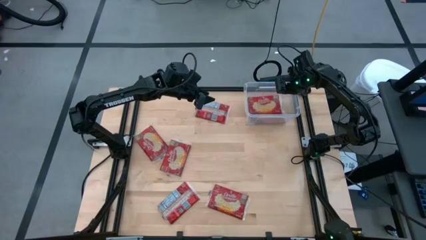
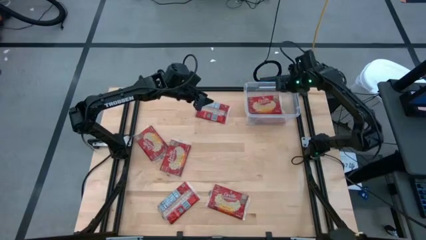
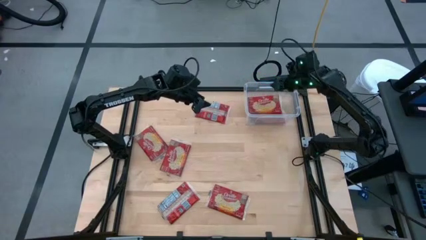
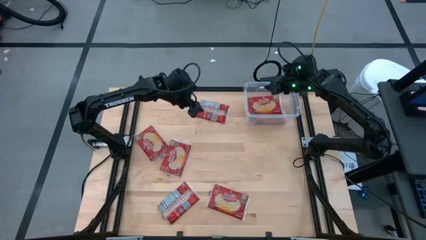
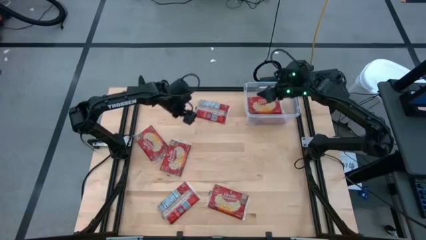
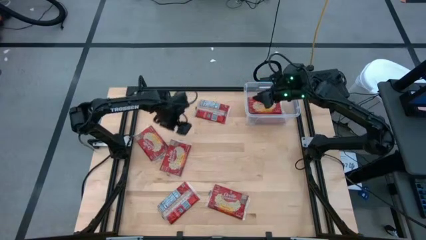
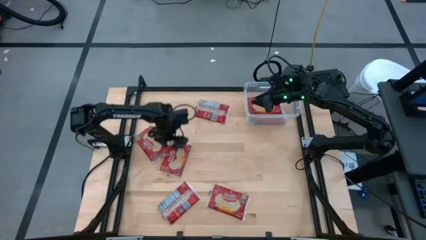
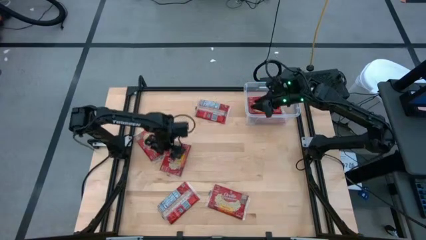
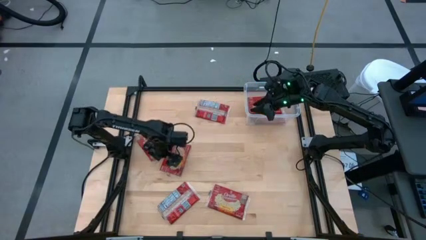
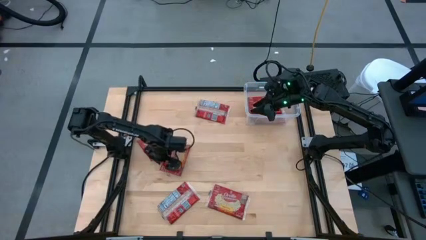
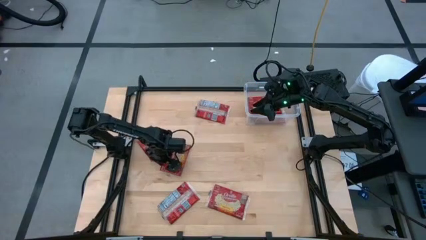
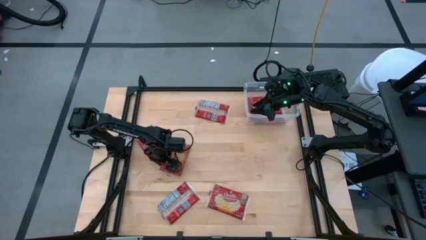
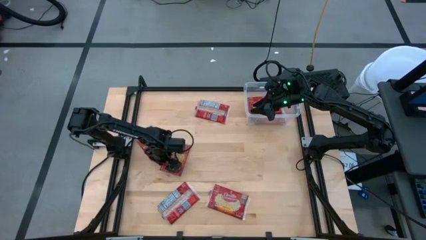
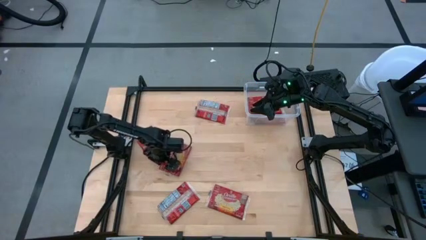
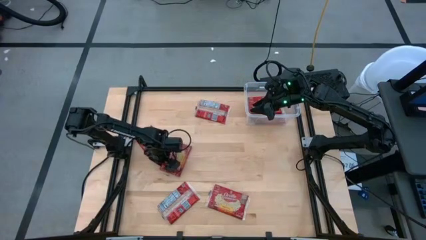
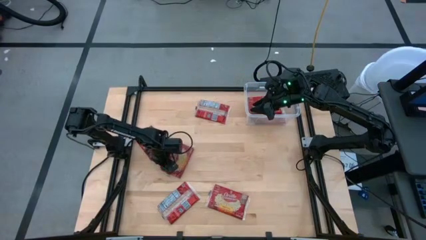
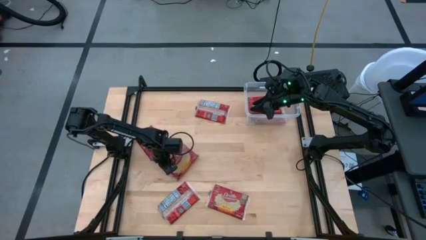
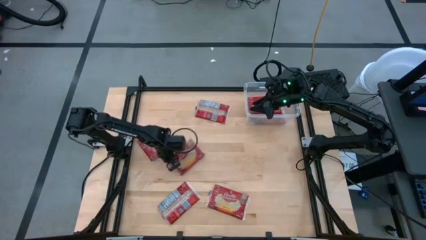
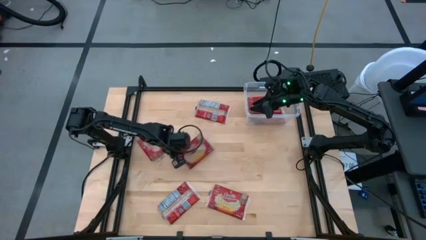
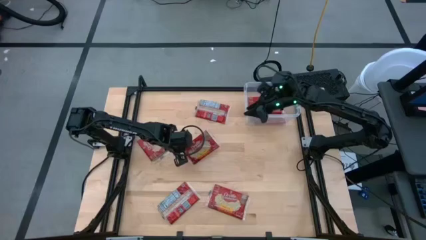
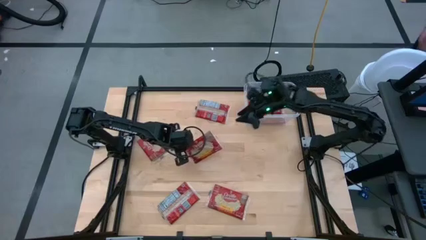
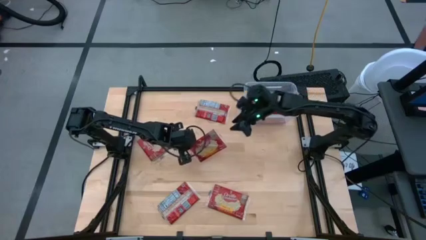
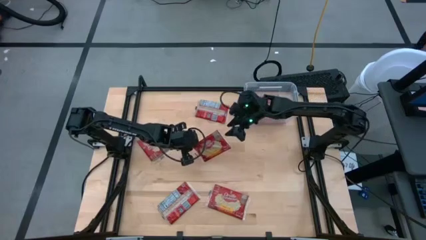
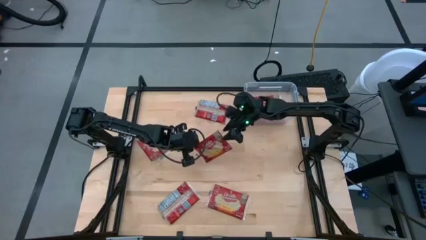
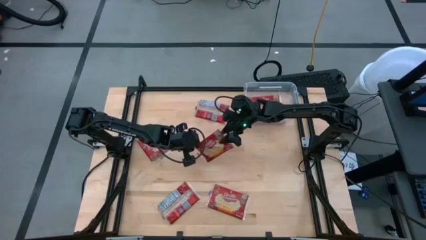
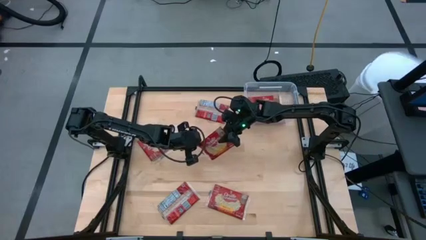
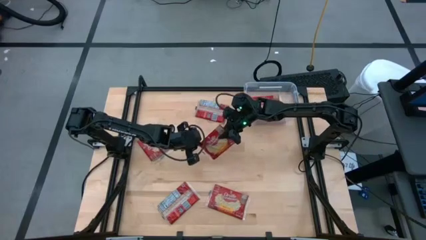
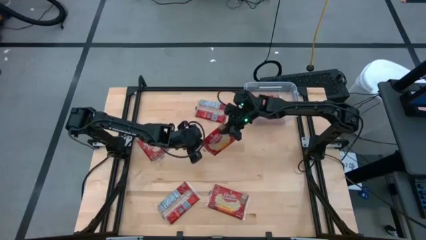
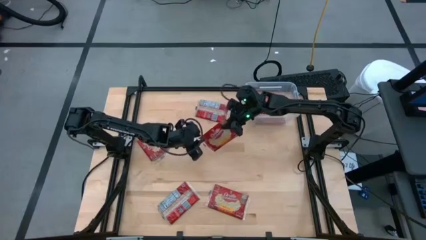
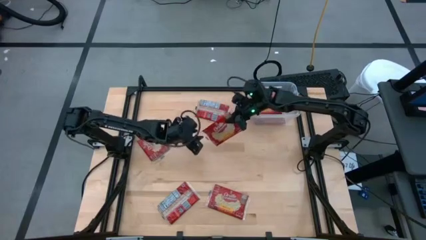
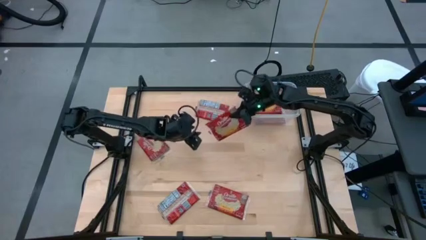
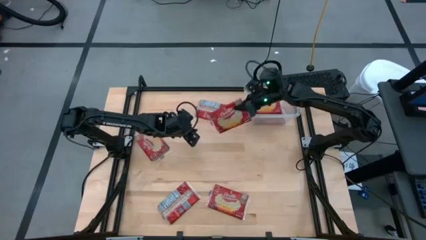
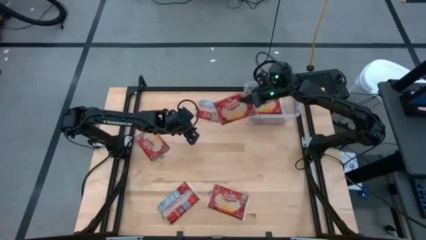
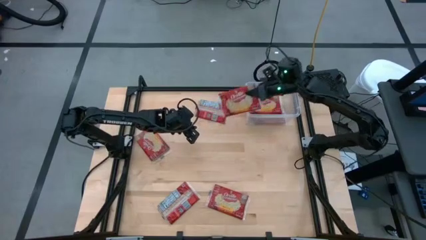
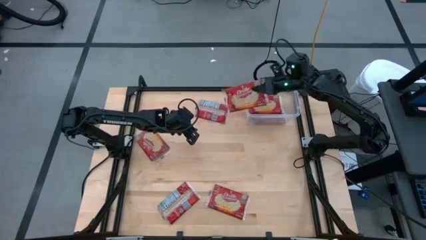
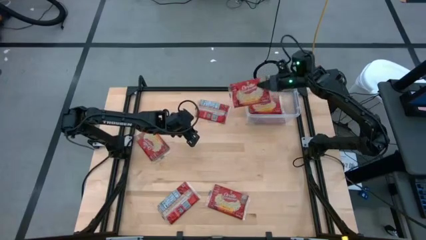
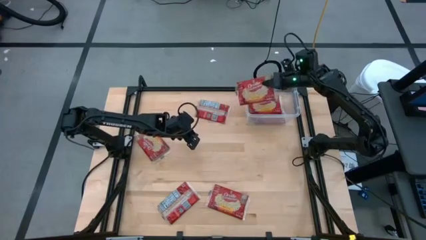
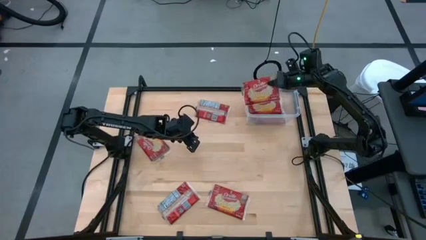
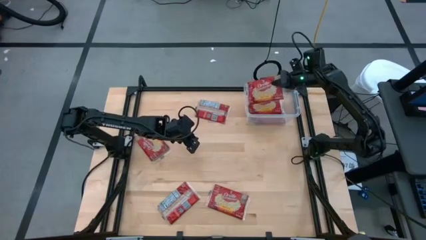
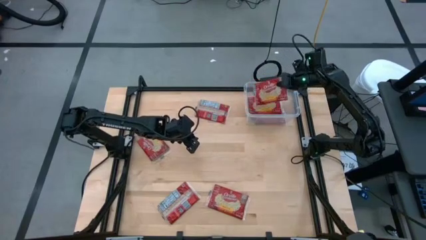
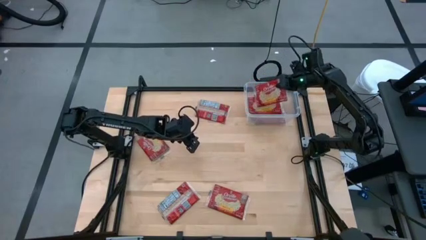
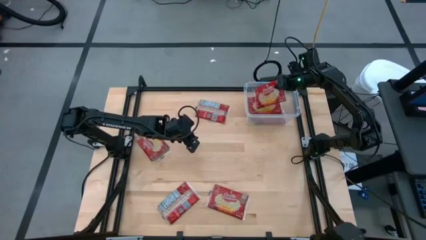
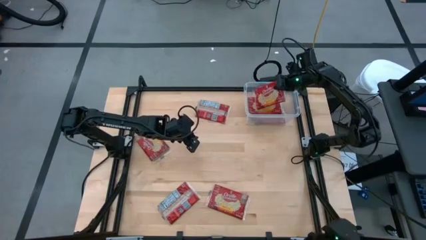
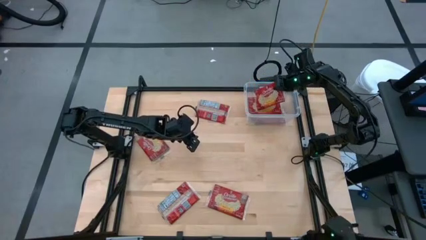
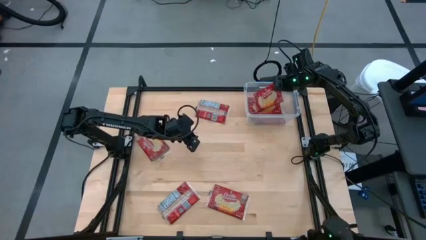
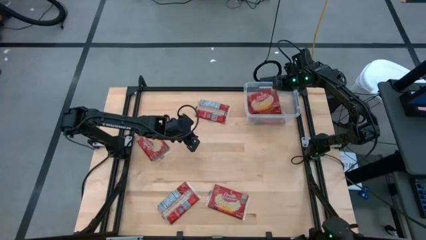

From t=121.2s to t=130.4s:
Task: Sort popcorn bags into baskets
Put the popcorn bag into the transparent container

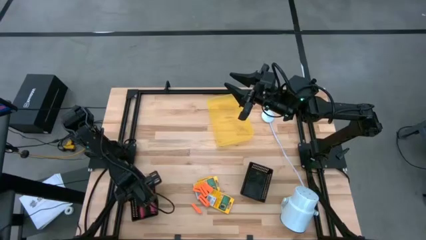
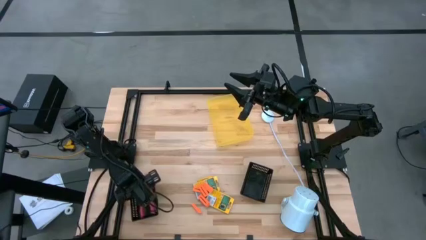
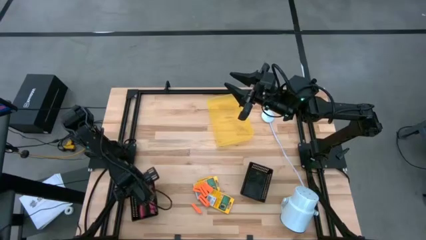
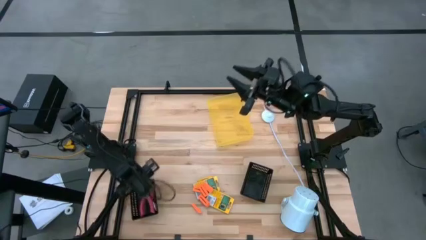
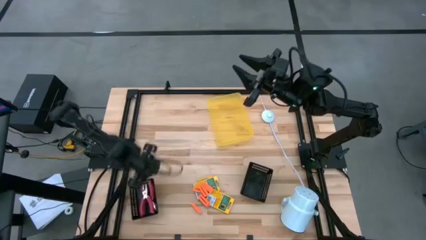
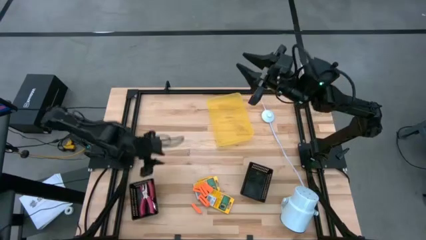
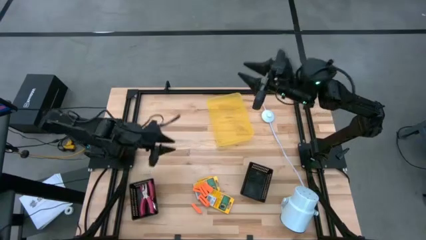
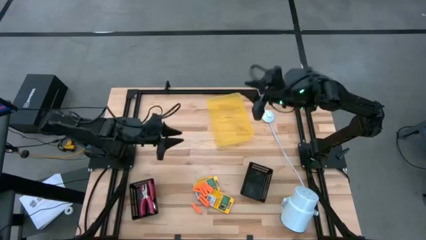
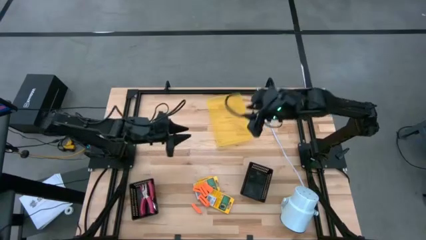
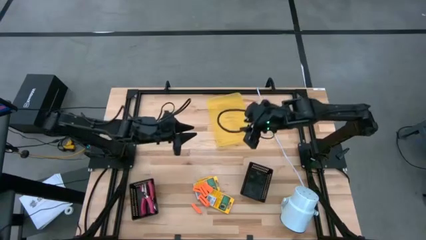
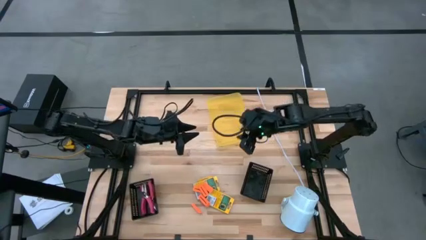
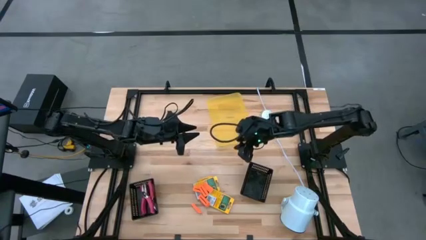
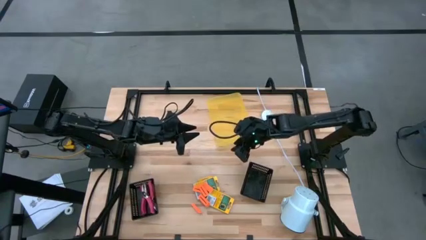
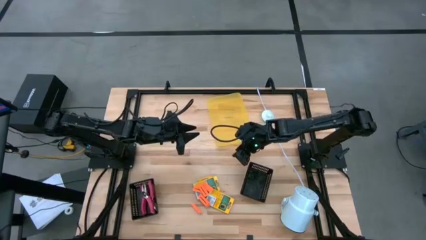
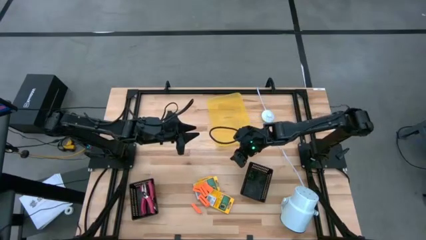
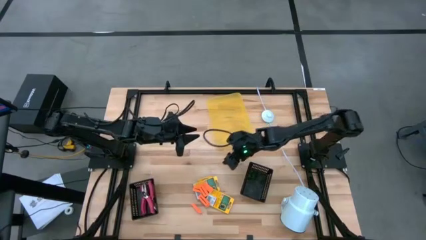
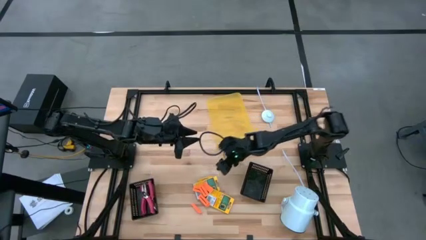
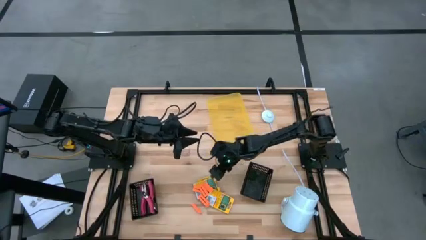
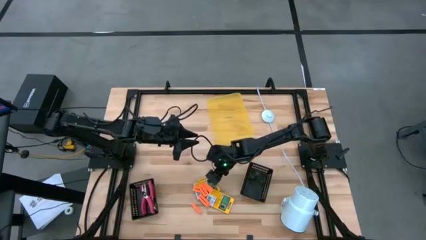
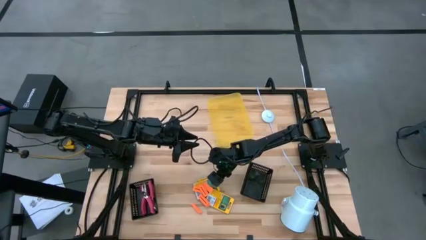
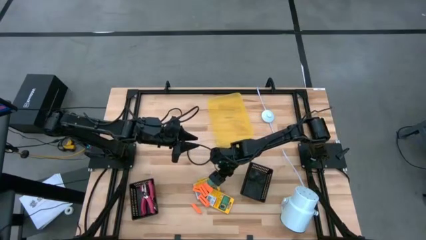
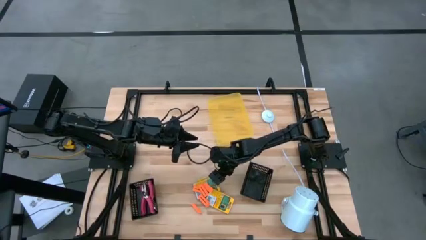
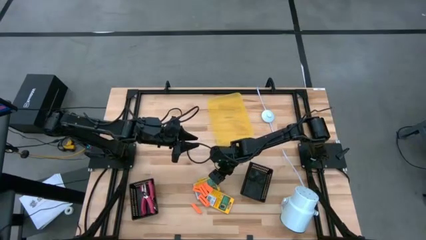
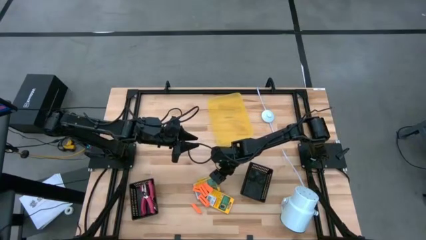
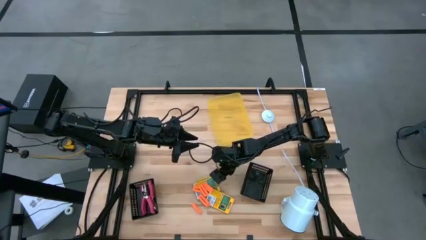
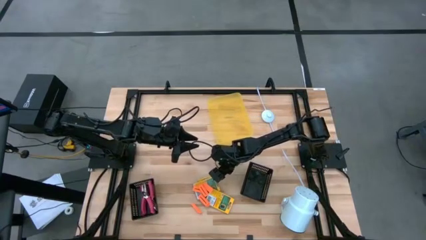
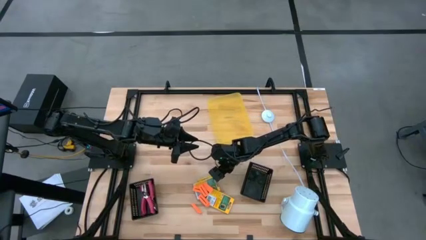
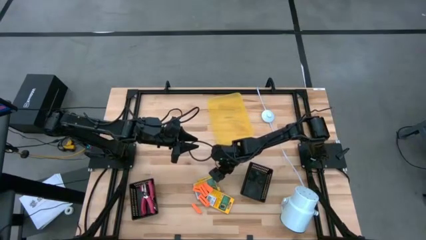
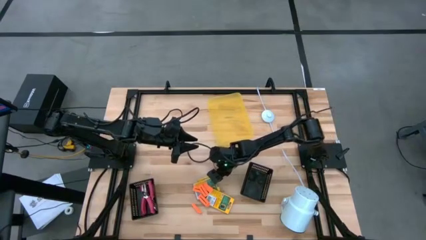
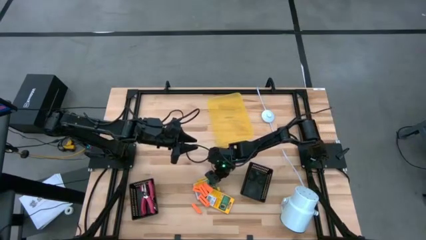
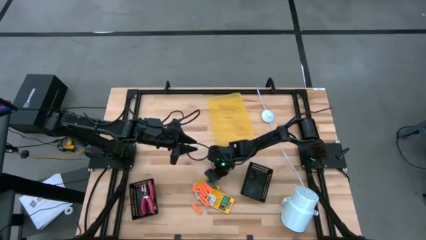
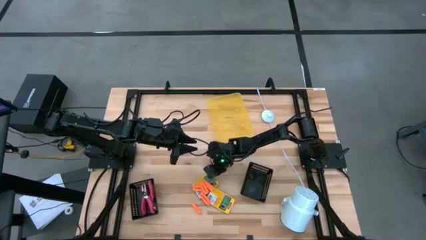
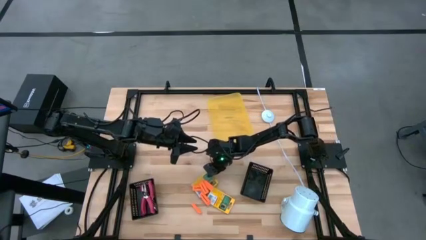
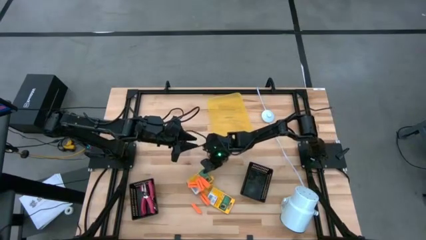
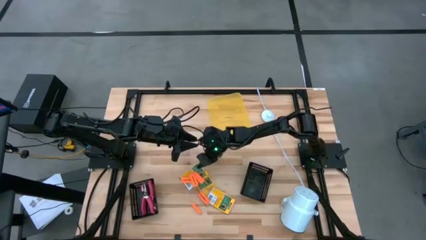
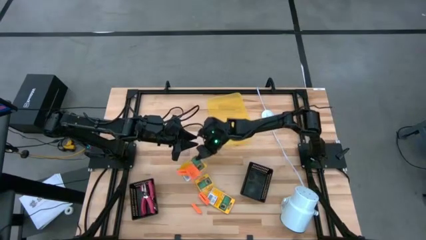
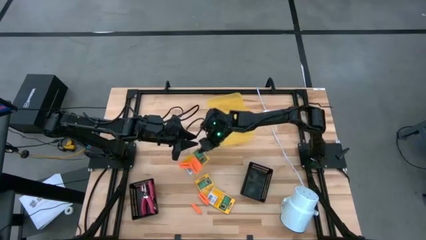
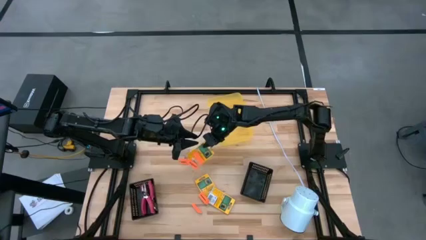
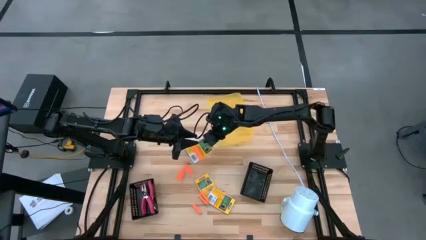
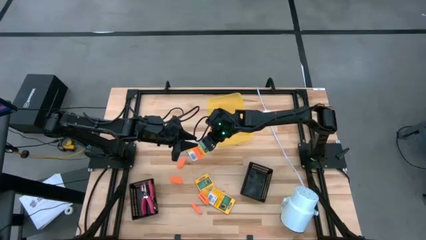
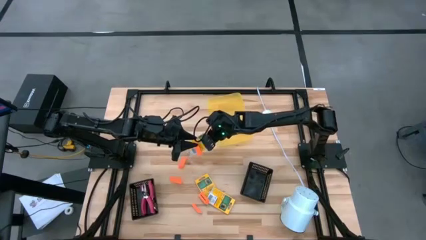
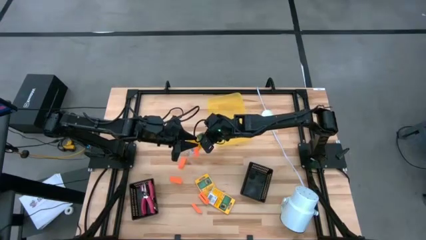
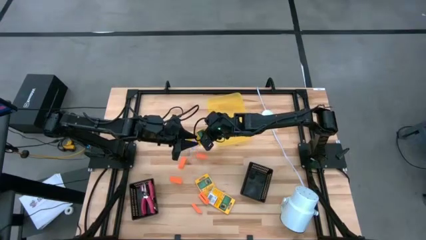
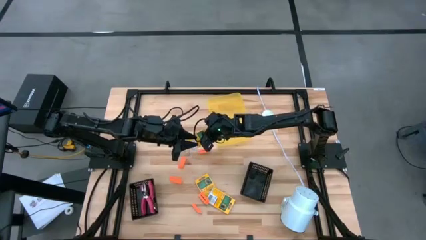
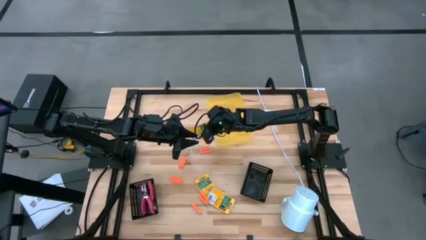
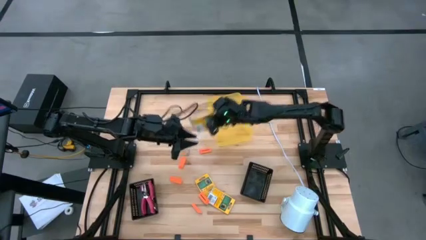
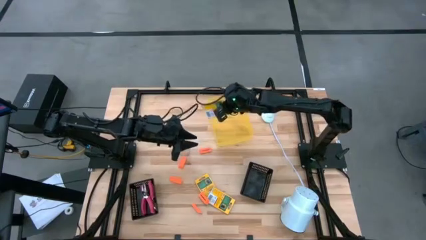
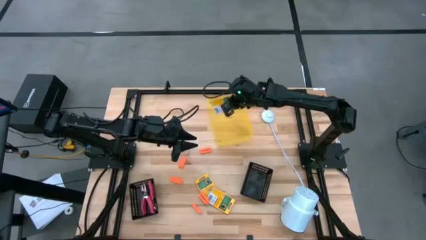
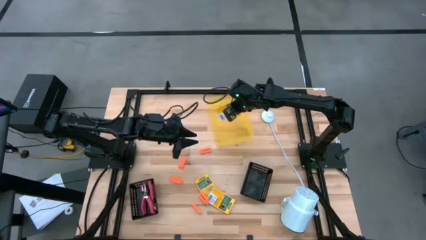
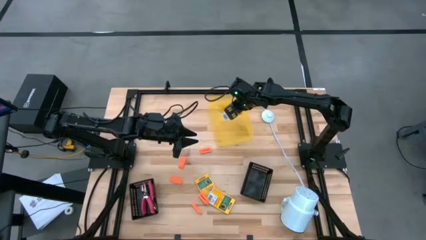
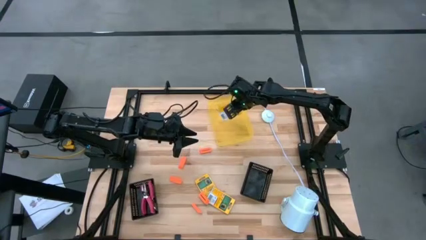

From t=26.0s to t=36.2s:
Task: Pick & Place School Supplies
Put the yellow crayon box into the yellow bin
